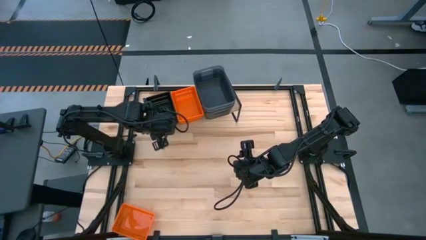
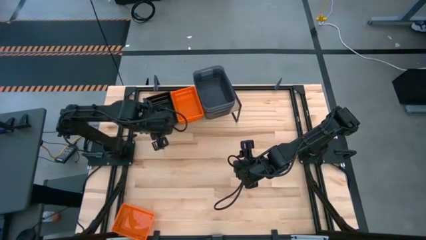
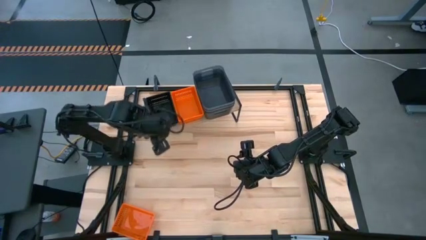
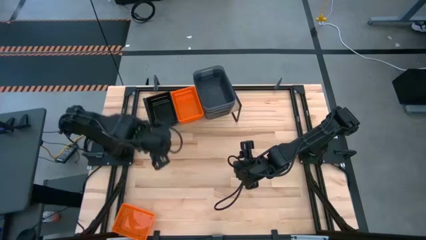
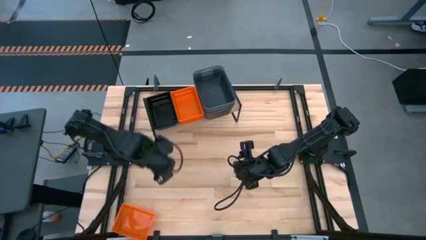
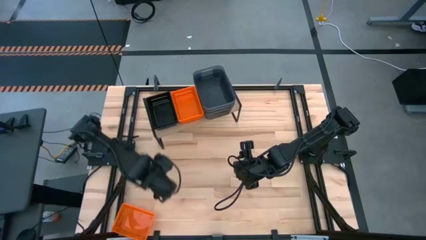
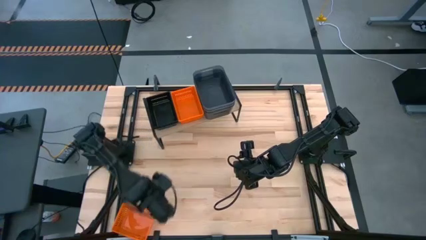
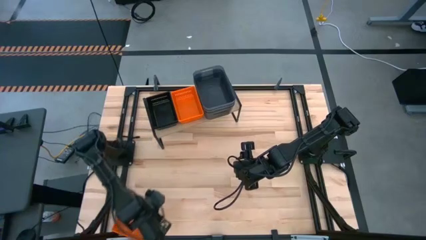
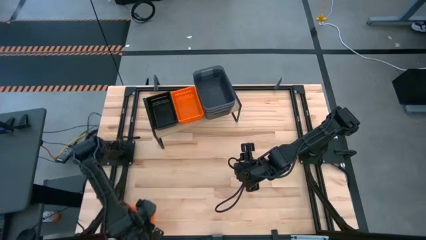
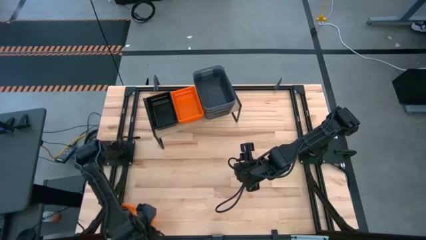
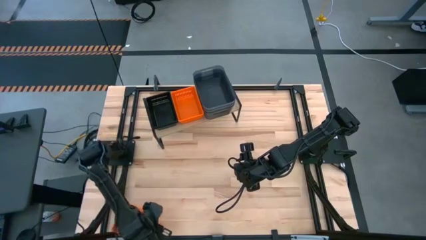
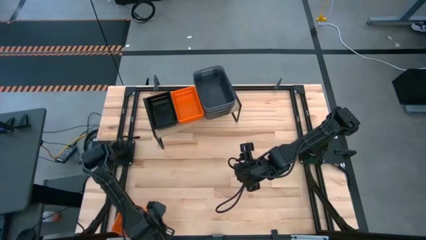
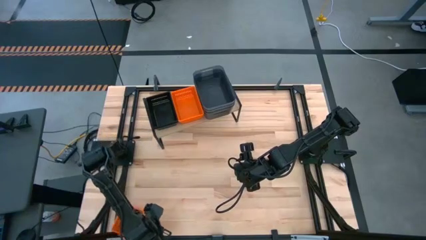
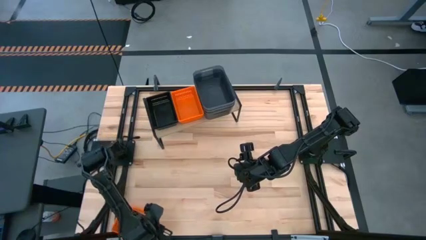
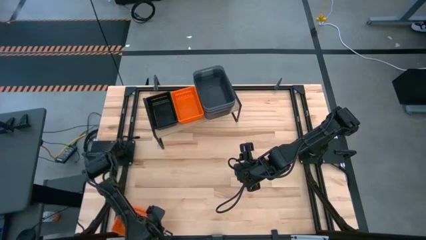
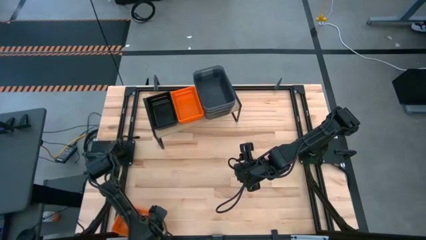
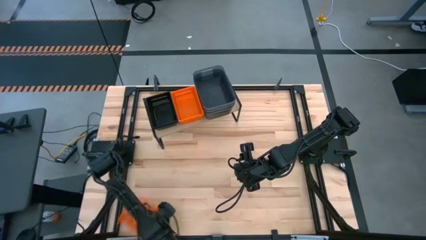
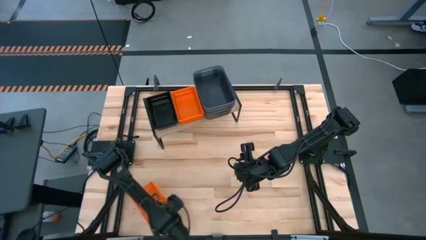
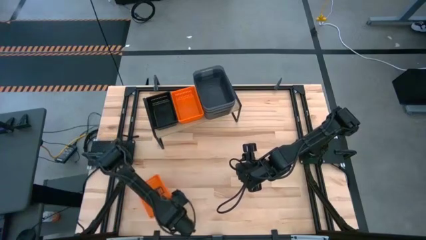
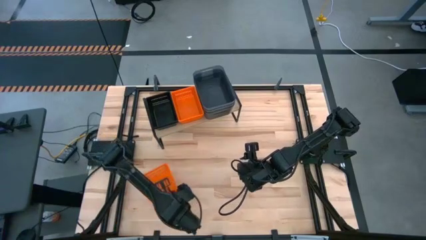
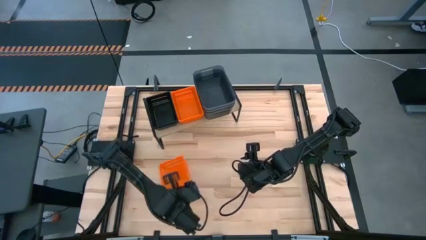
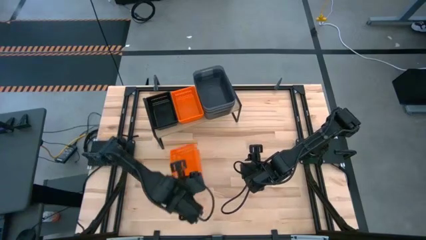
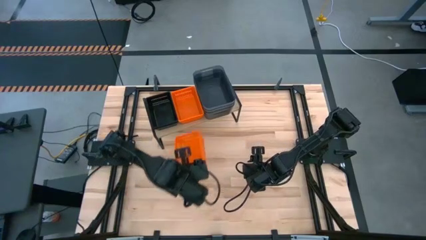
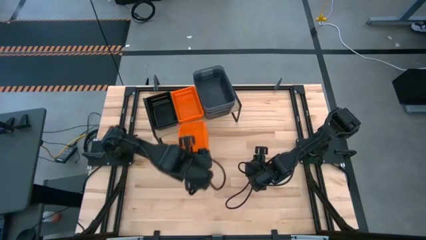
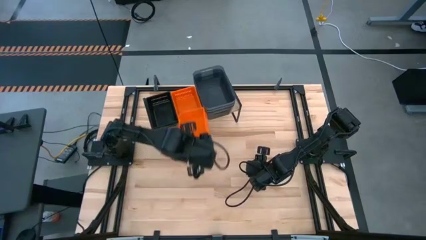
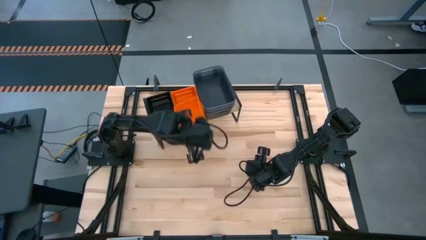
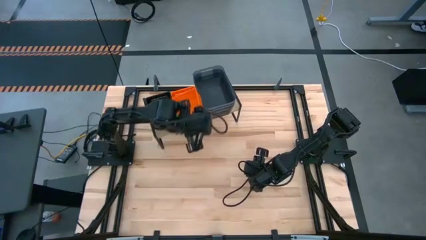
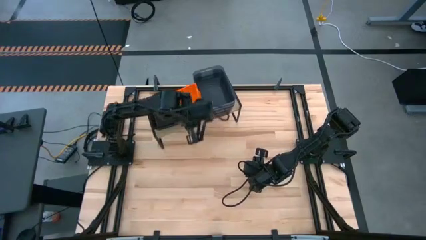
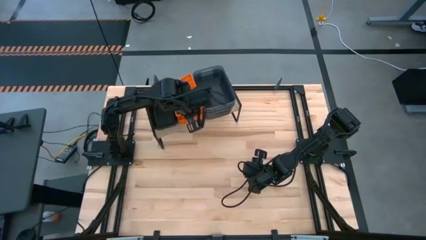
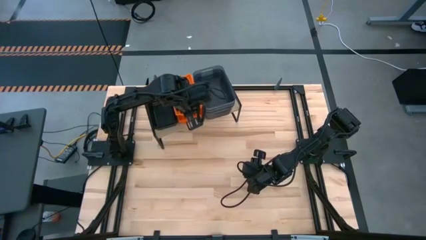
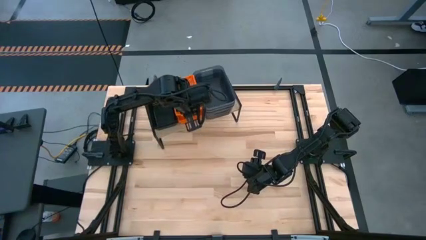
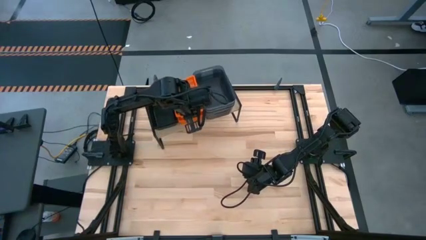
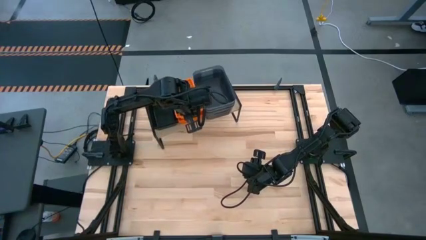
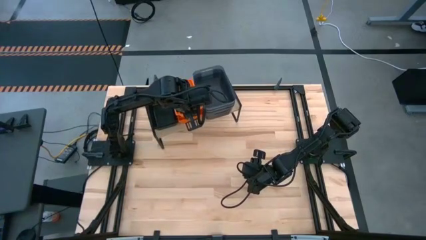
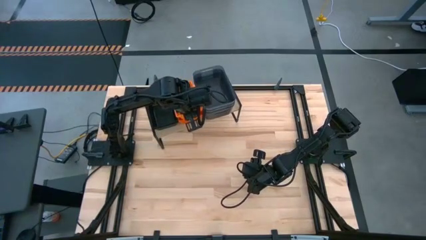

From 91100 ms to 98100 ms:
Task: Stack baskets on shelf by color
Stack the orange bin on top of the other orange bin on the shelf

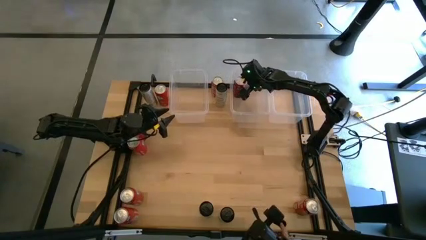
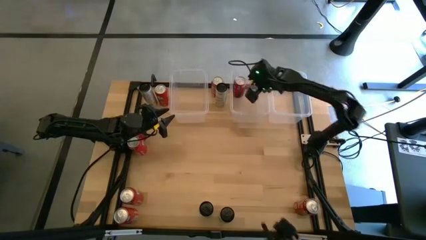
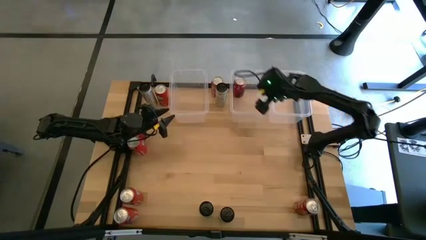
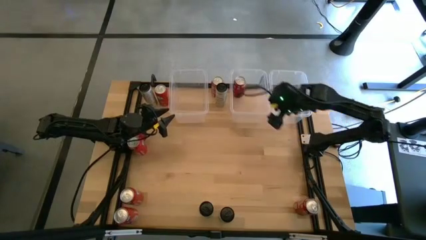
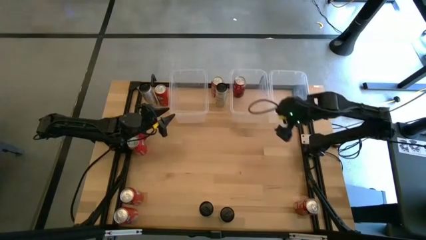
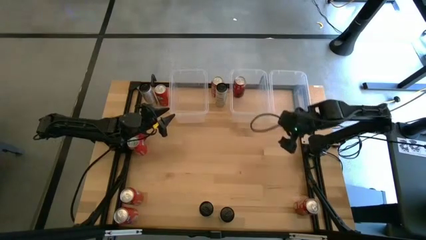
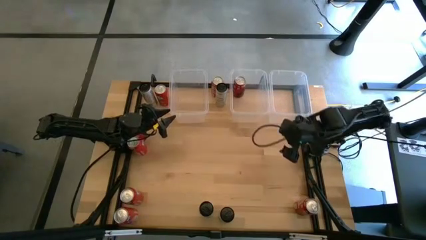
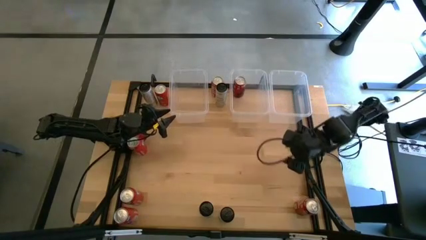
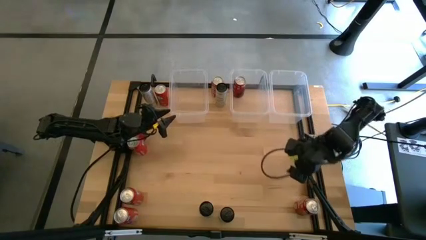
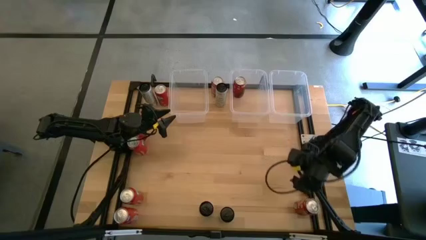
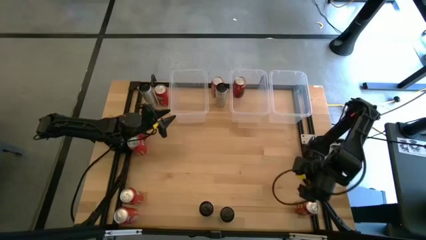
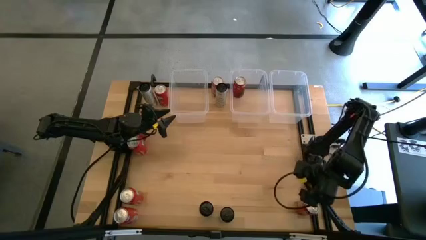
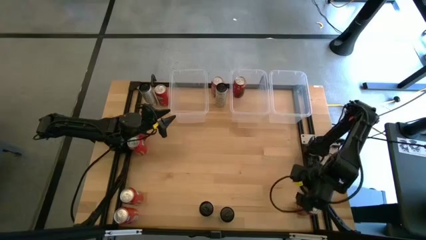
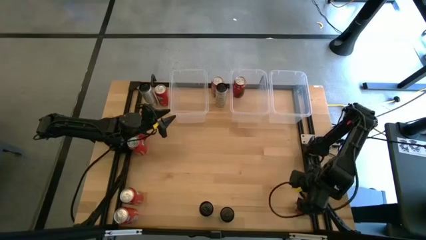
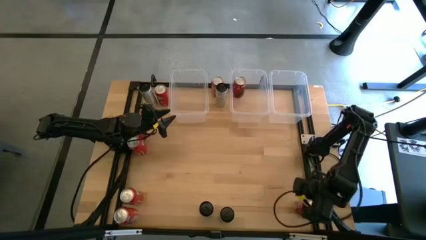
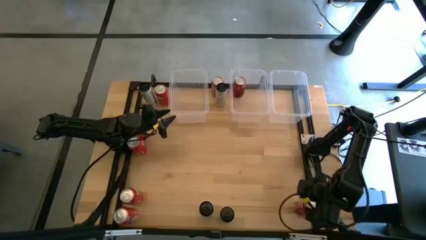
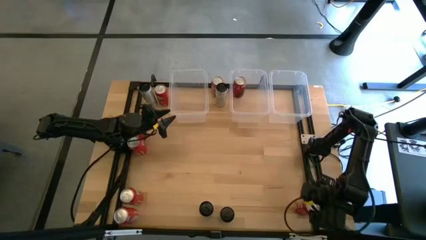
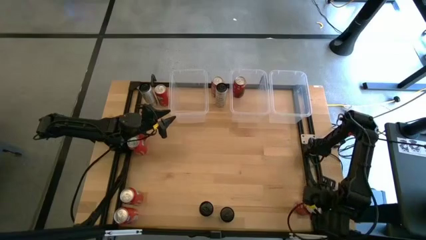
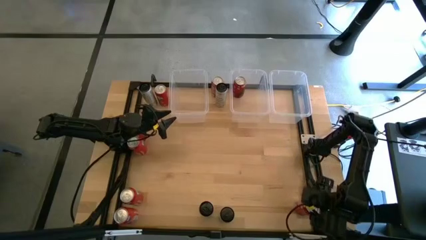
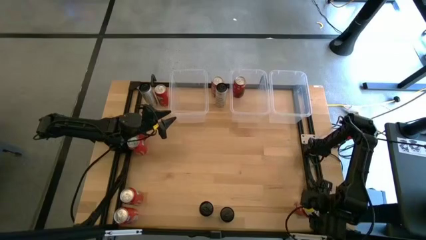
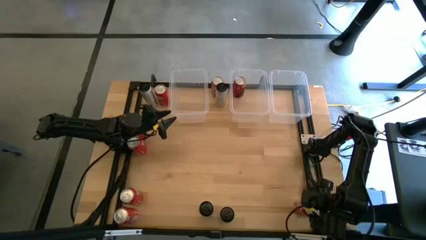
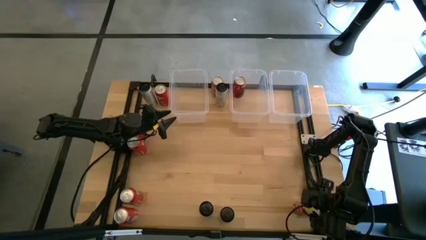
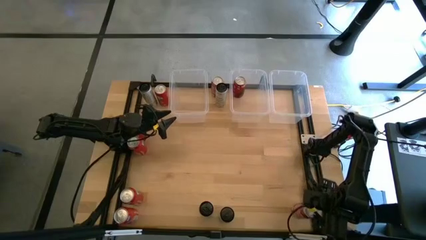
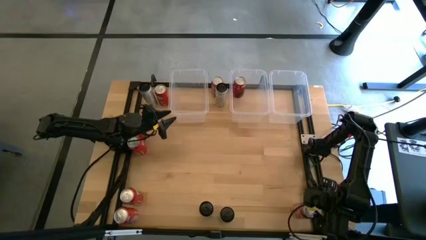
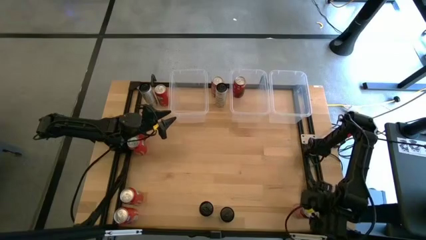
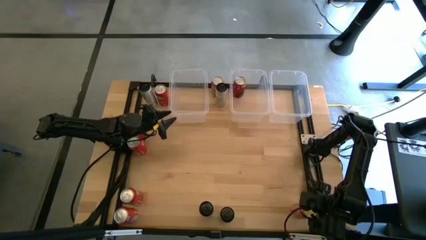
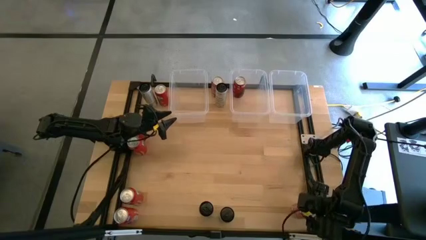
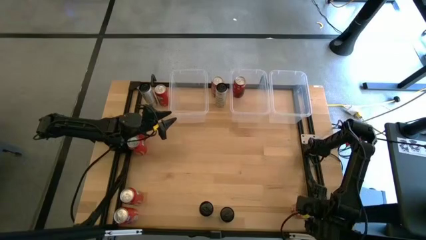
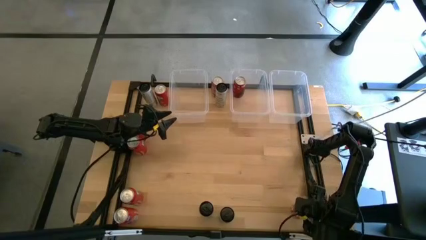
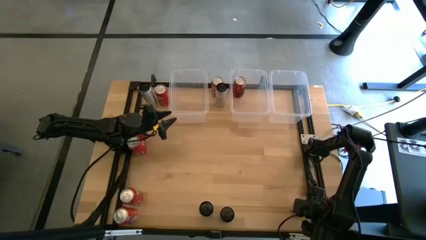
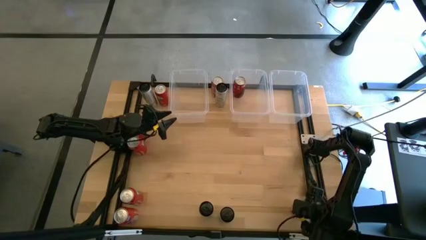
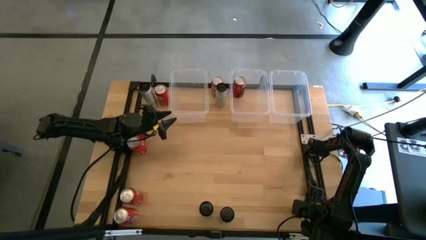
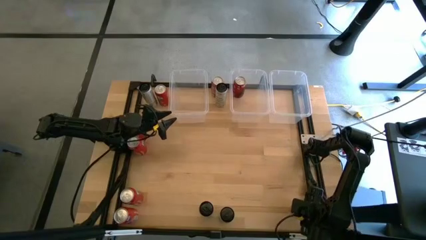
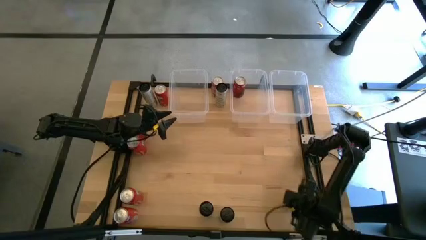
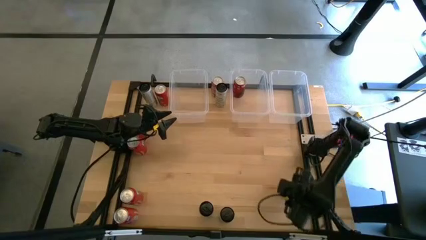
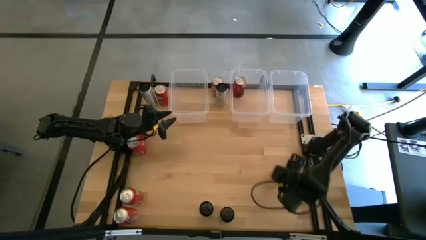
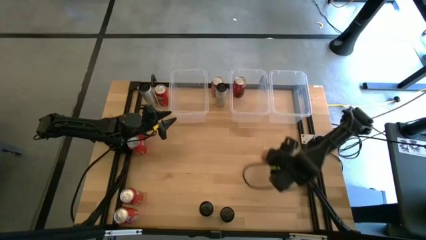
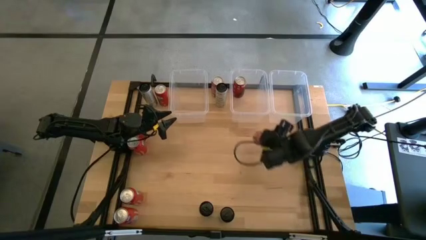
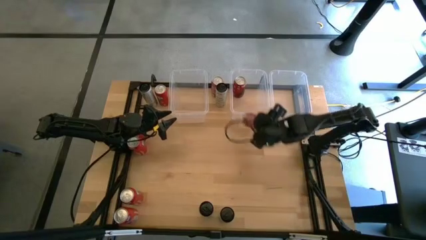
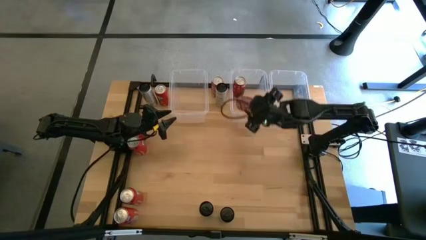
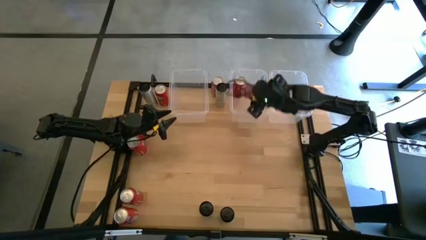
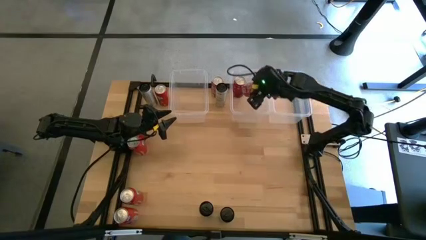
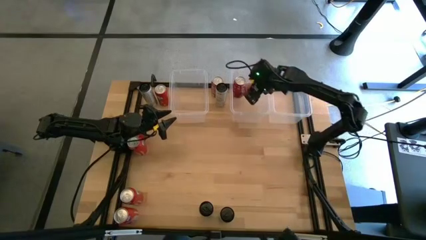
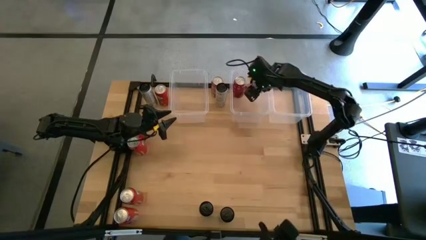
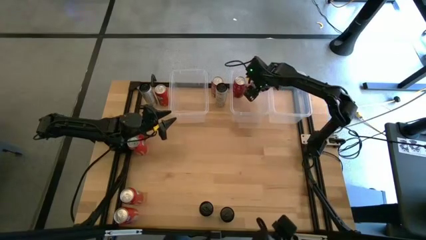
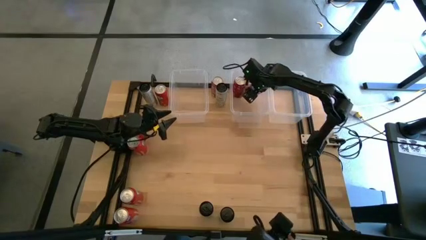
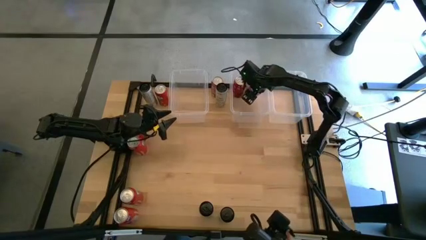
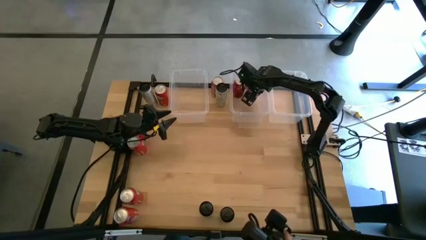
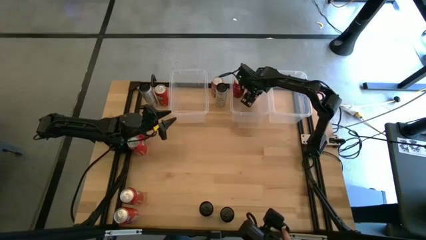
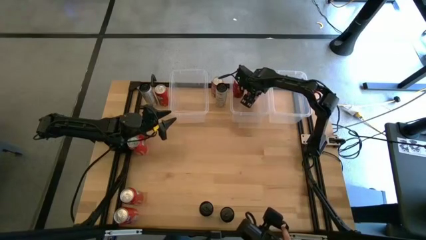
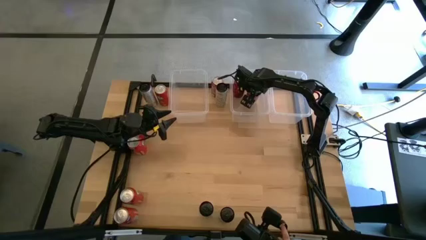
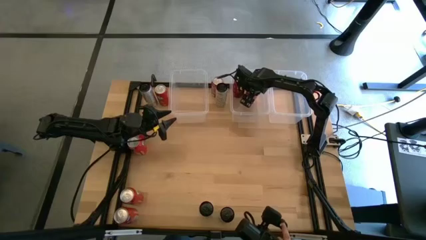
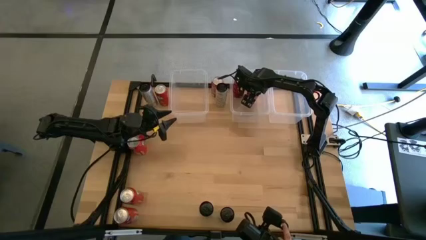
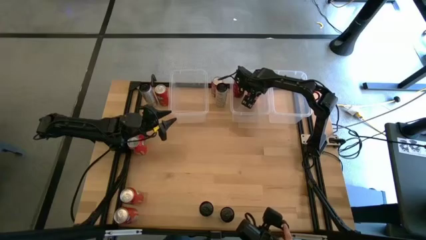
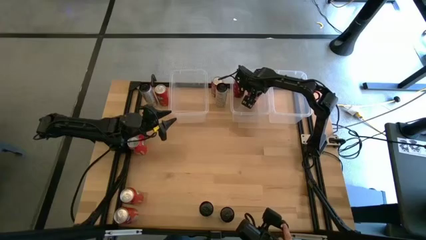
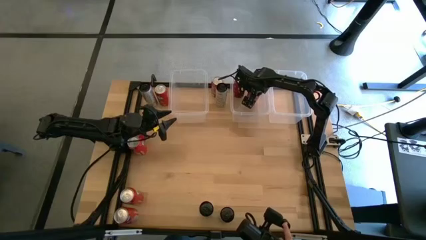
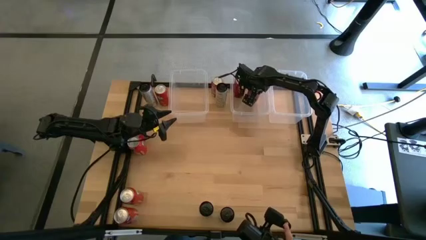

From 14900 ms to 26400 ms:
Task: Sort soda cans
Put the bottom red soda can into the center transparent bin
